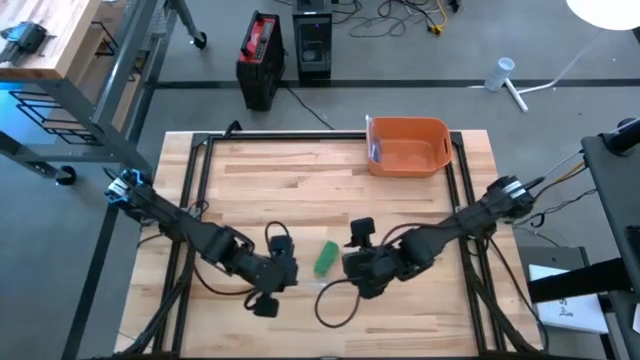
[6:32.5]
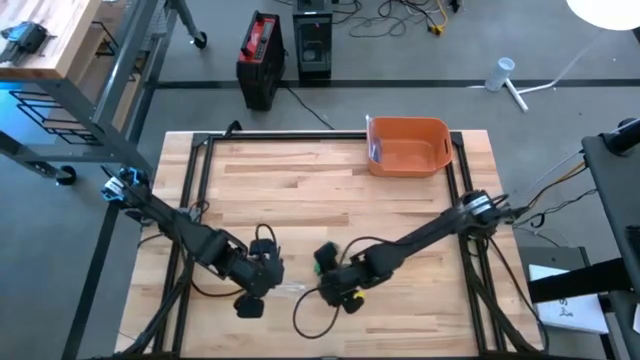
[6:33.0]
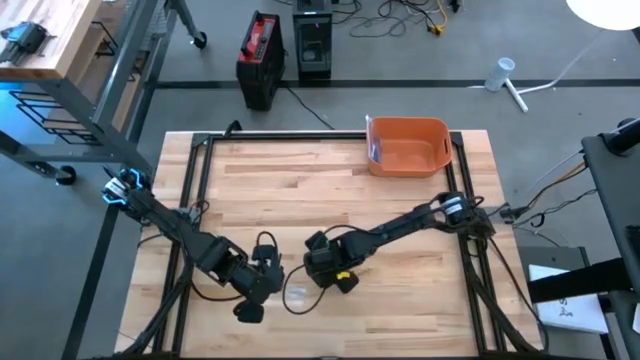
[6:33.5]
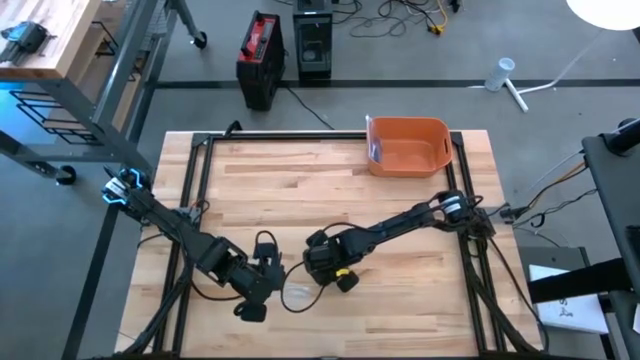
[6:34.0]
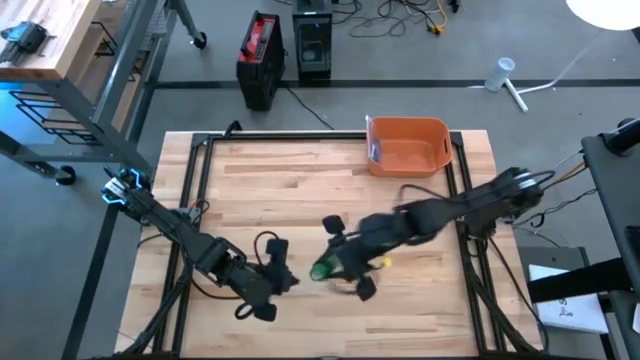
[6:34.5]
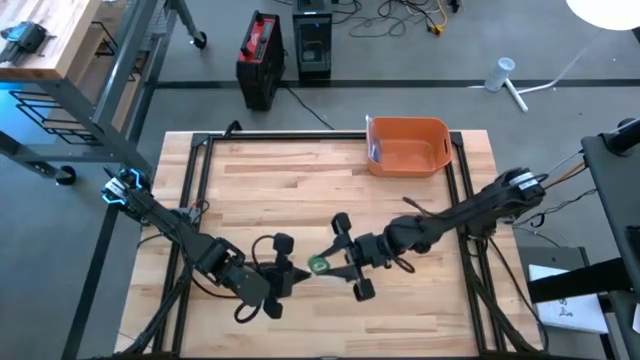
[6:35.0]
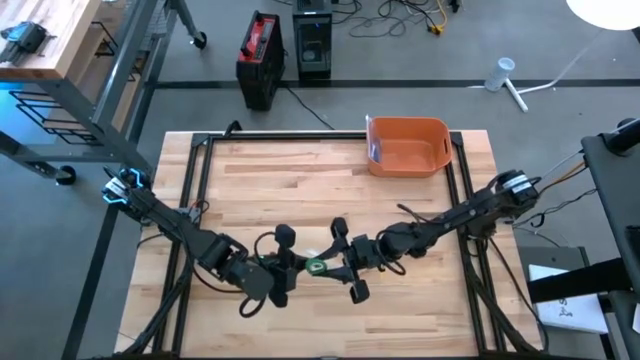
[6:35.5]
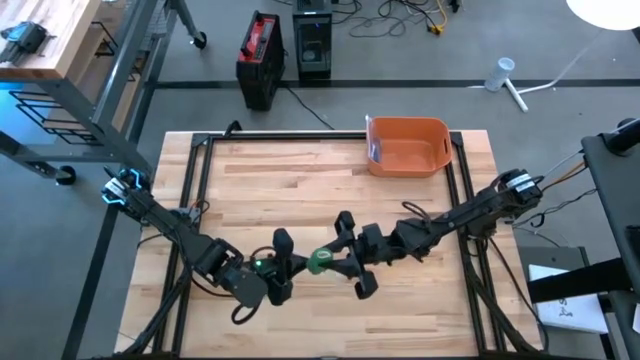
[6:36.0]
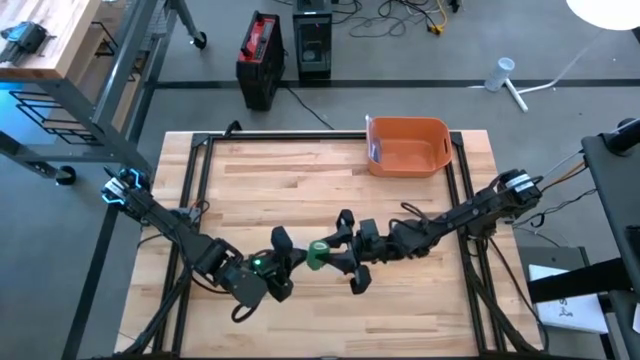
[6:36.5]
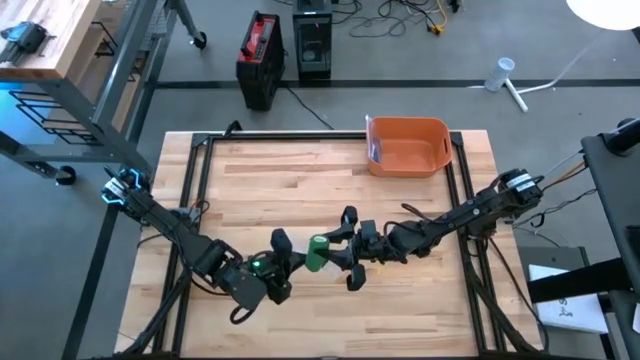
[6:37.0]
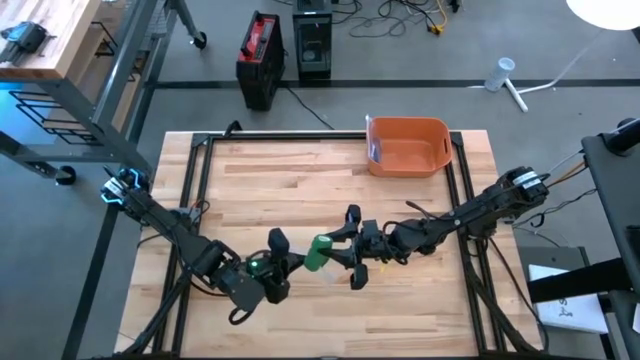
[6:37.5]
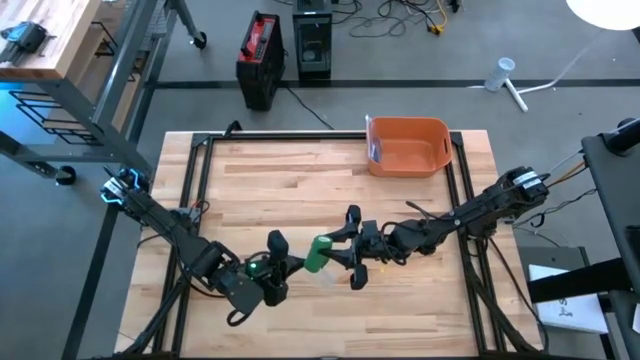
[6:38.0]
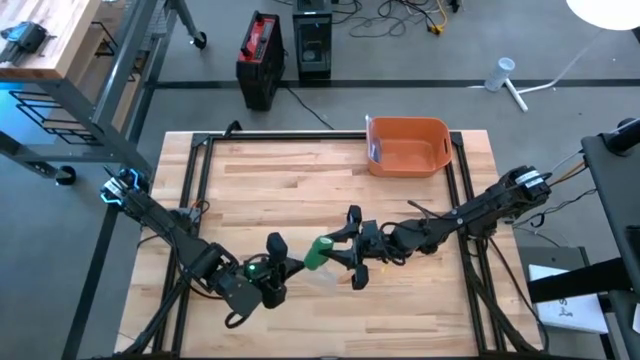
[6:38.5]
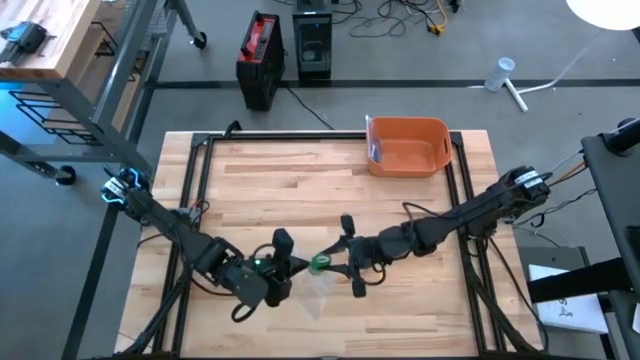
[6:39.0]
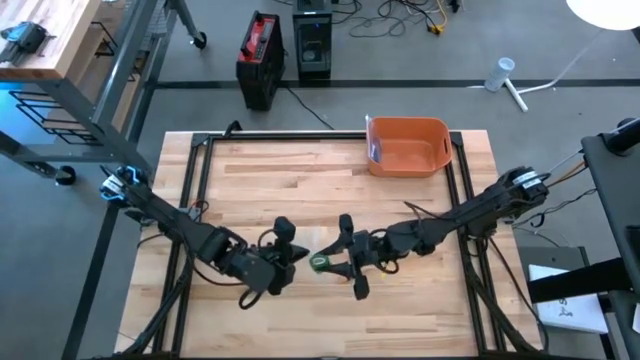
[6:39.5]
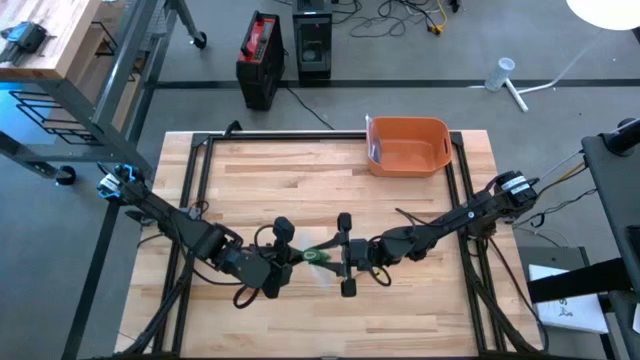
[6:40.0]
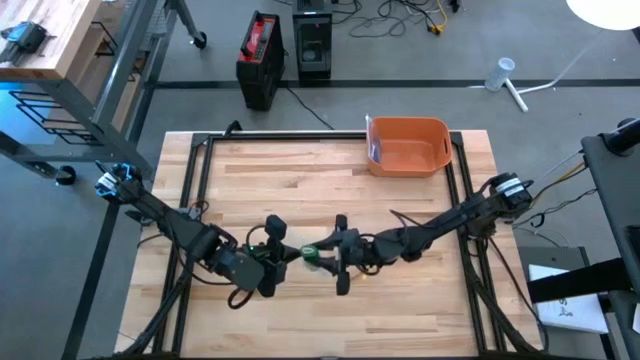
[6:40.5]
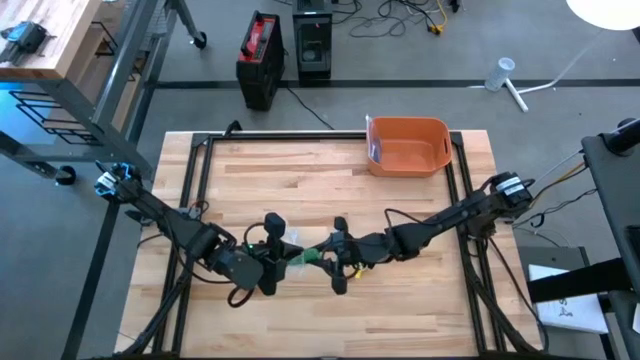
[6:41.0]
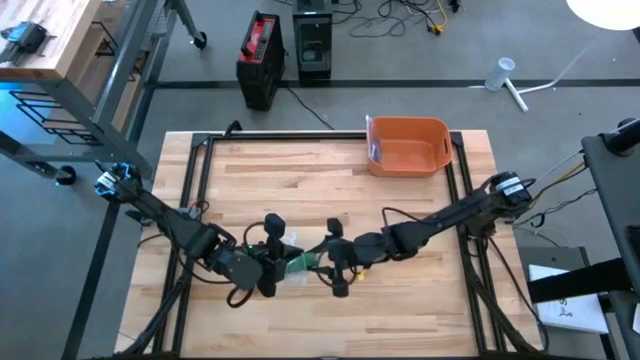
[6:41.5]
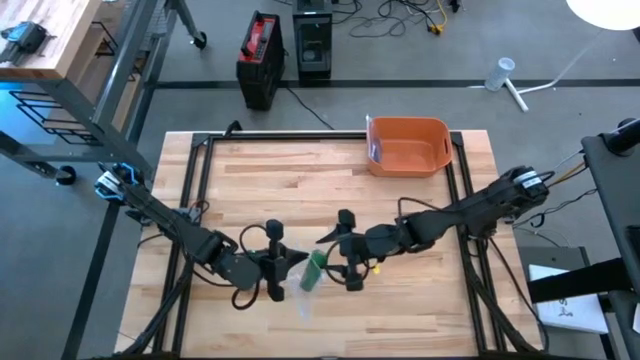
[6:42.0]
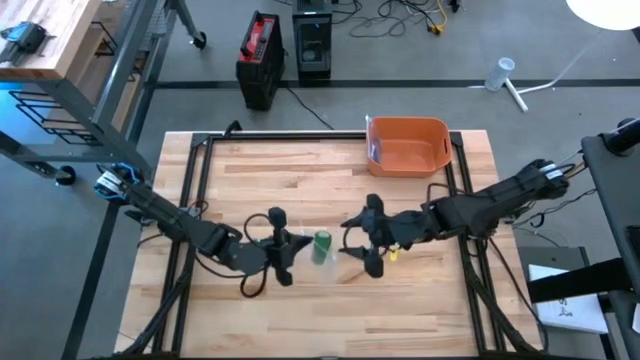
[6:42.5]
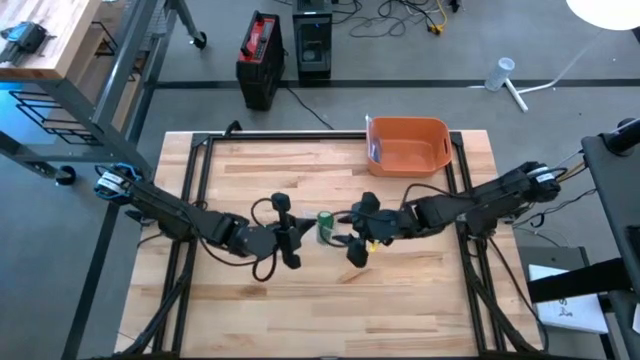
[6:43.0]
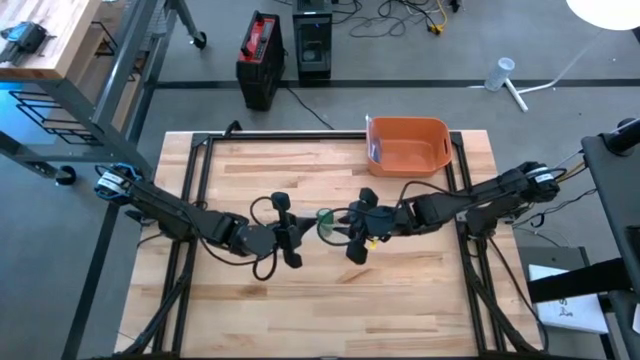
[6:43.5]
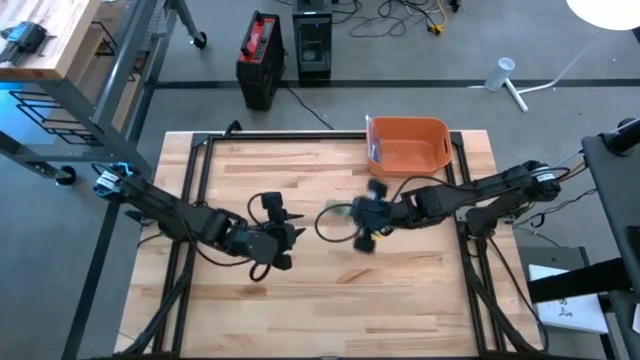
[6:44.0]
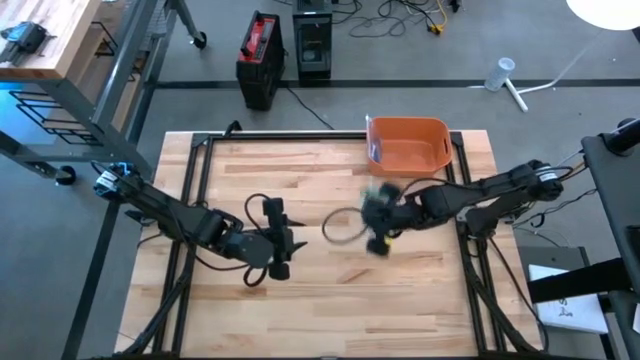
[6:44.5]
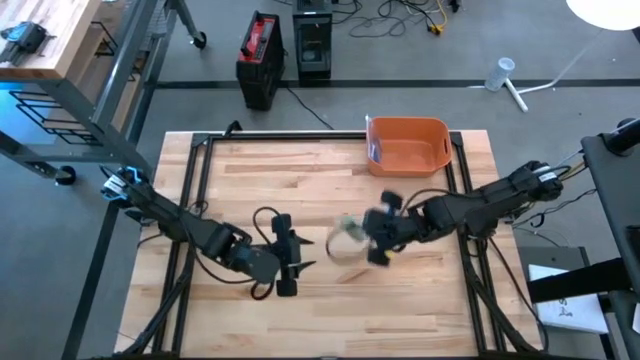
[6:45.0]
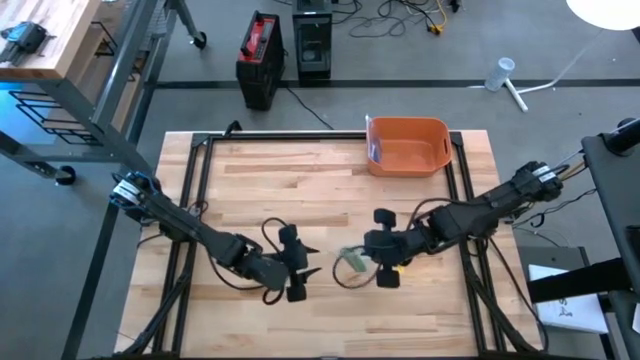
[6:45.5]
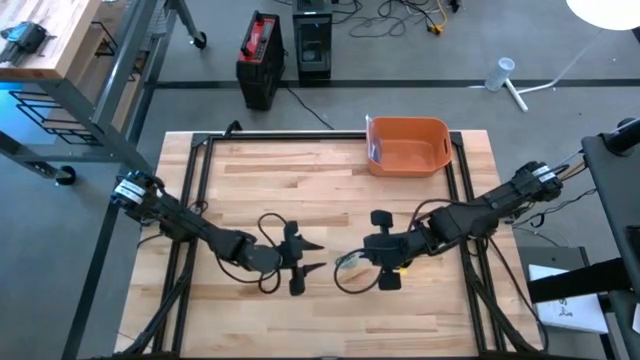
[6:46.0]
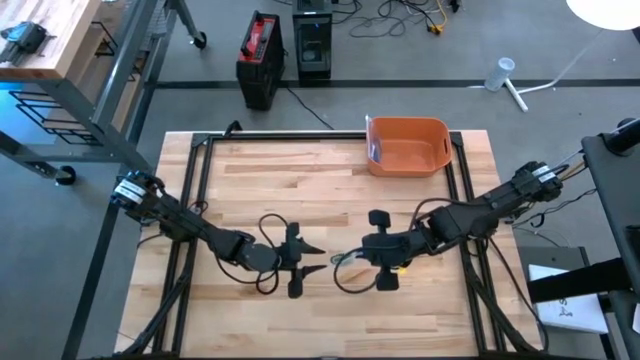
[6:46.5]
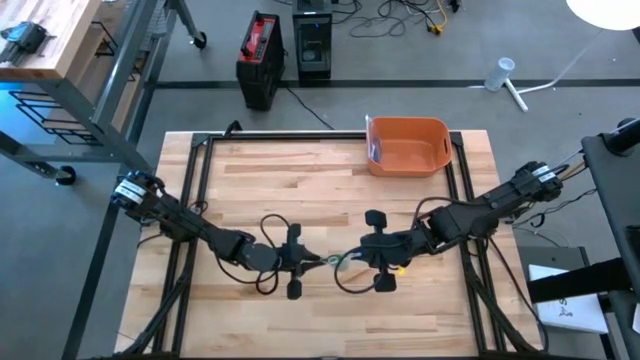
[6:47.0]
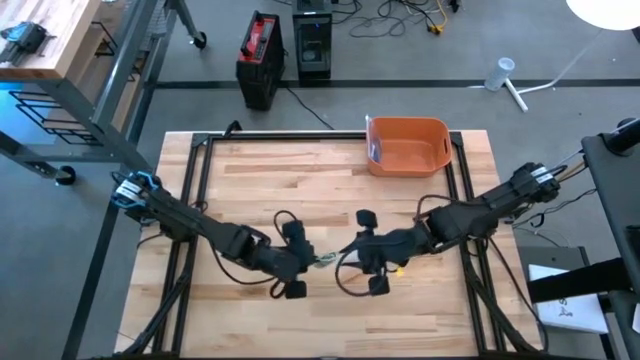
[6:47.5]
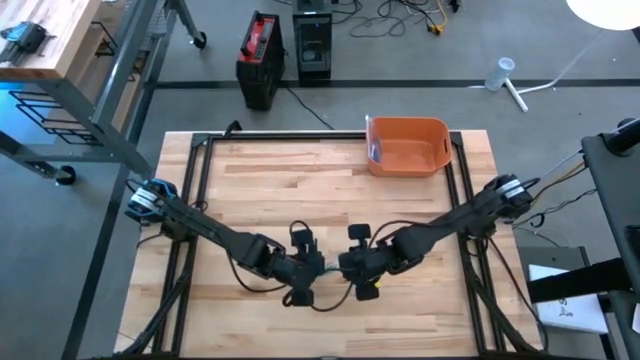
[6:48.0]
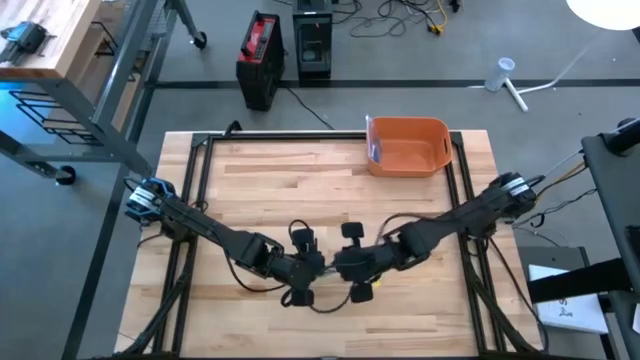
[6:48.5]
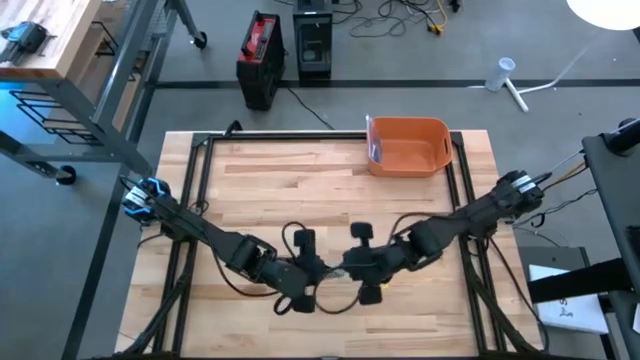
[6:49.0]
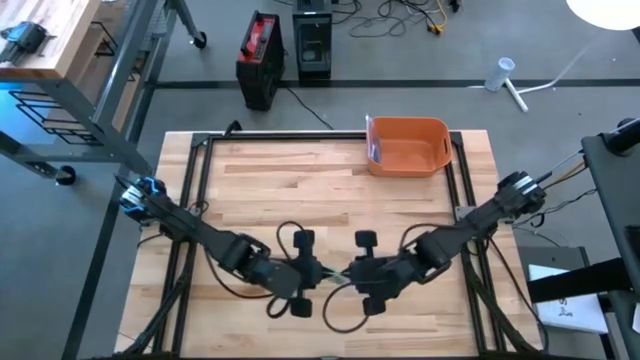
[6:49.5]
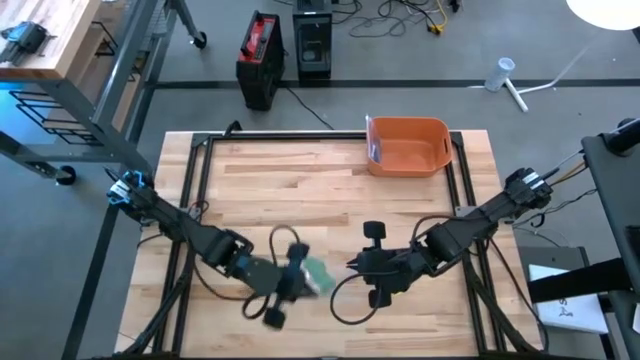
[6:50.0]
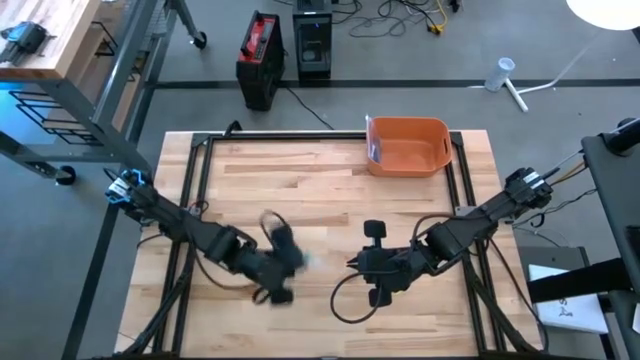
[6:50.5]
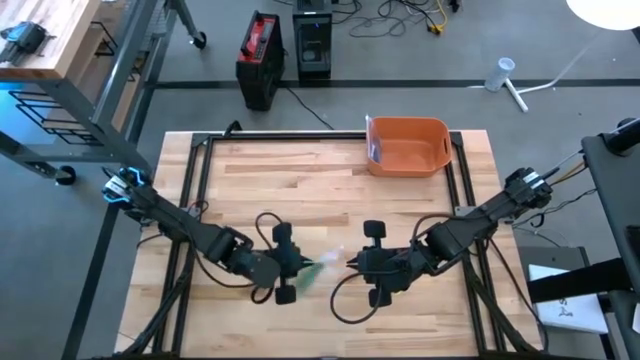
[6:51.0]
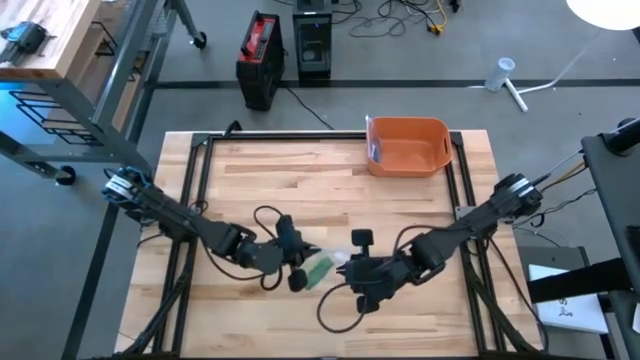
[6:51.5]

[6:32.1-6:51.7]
Task: Roll bandage
Put the rolled green bandage inside the transparent zip bag
